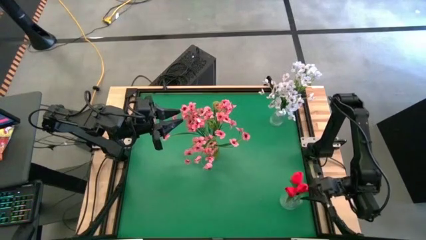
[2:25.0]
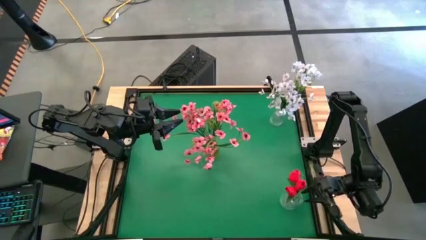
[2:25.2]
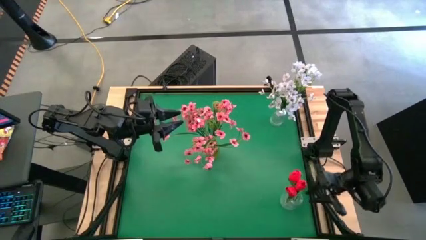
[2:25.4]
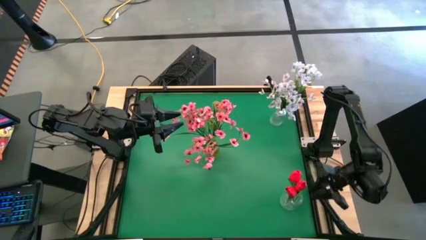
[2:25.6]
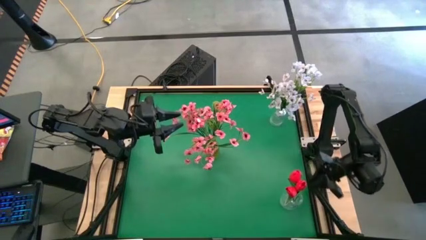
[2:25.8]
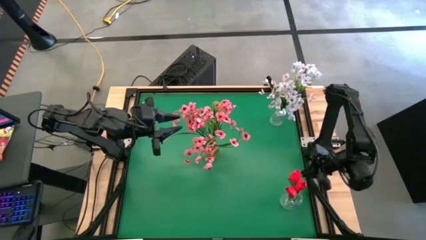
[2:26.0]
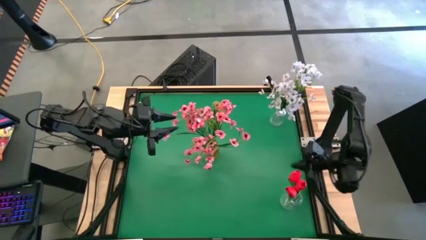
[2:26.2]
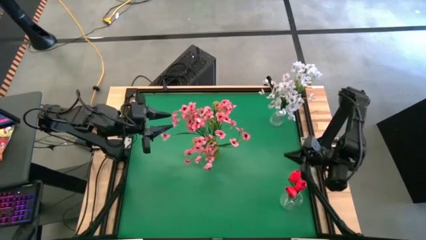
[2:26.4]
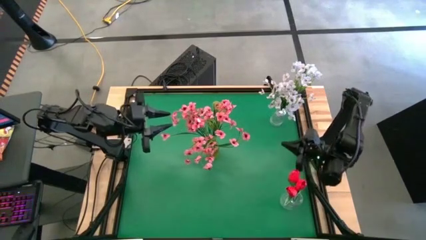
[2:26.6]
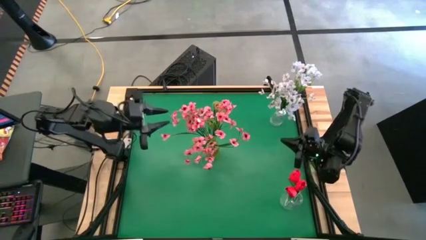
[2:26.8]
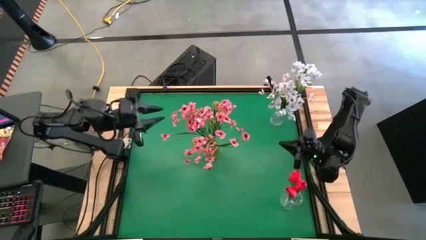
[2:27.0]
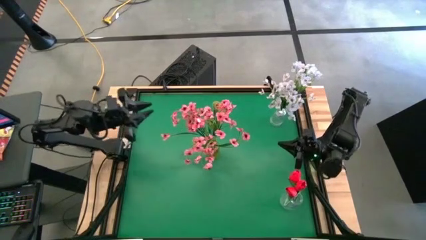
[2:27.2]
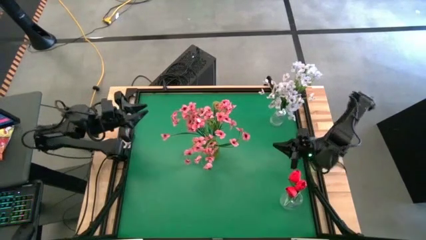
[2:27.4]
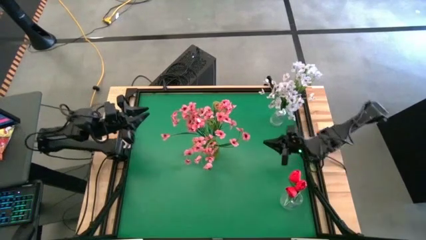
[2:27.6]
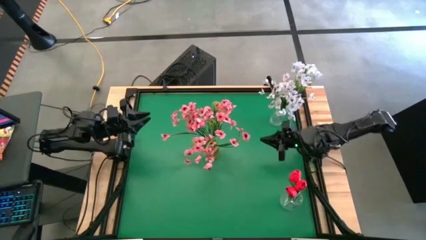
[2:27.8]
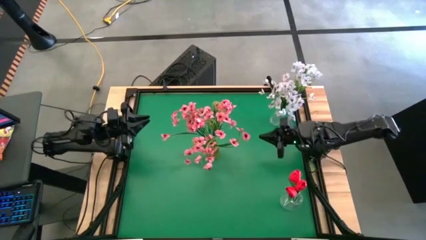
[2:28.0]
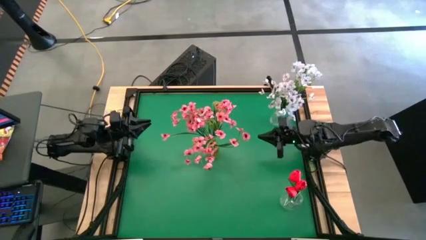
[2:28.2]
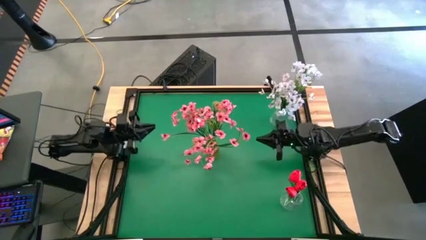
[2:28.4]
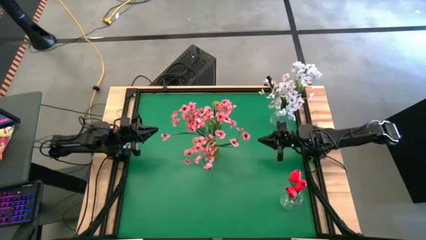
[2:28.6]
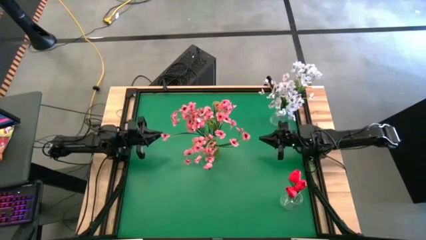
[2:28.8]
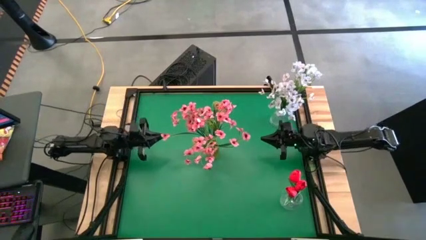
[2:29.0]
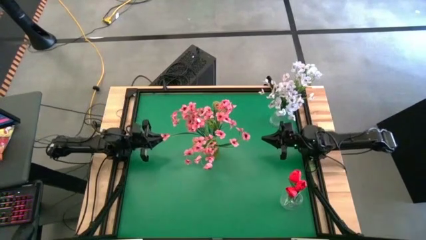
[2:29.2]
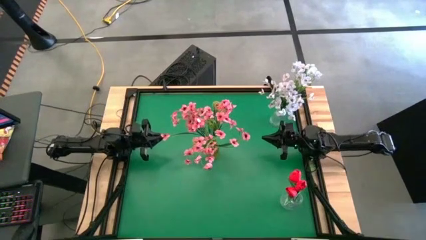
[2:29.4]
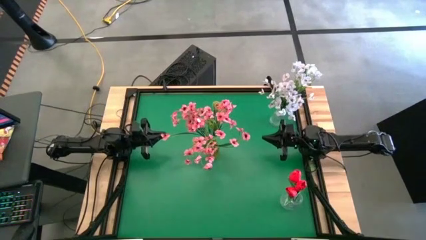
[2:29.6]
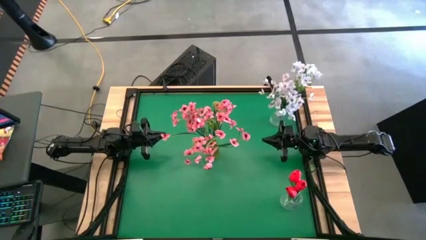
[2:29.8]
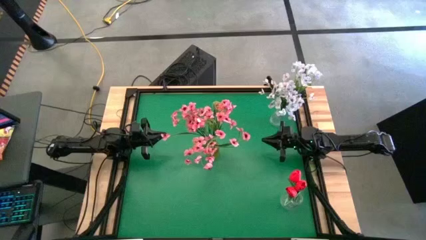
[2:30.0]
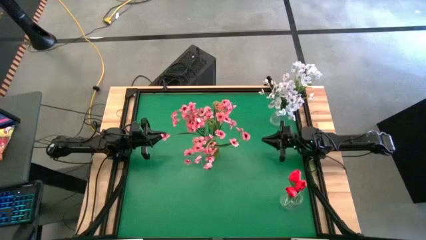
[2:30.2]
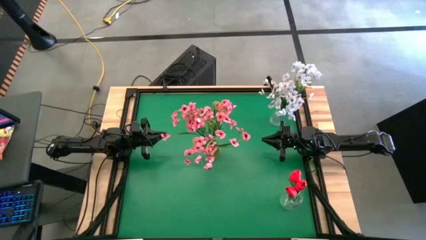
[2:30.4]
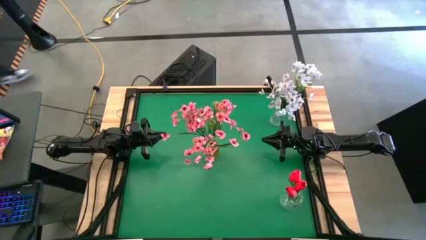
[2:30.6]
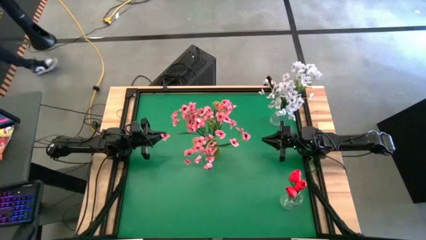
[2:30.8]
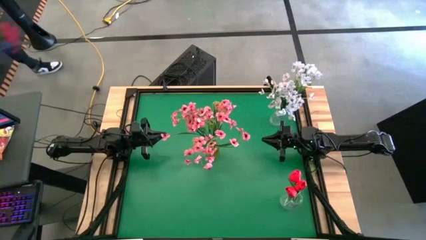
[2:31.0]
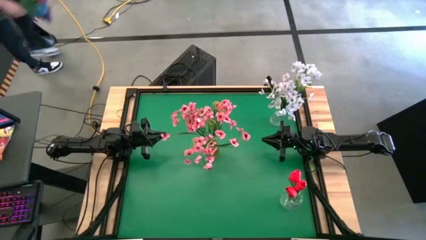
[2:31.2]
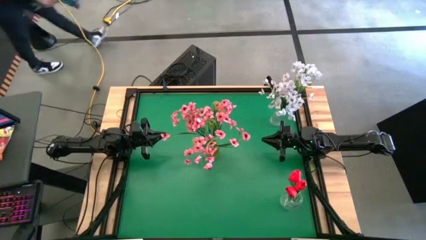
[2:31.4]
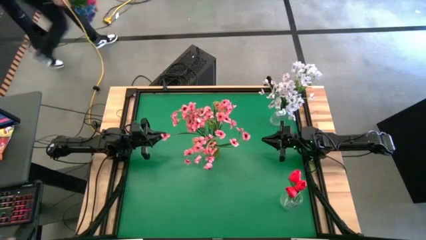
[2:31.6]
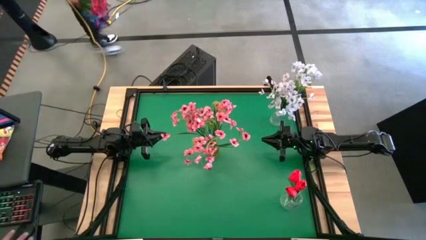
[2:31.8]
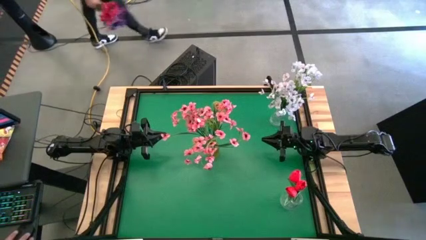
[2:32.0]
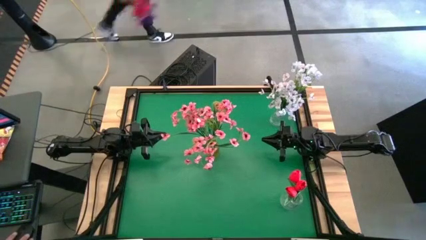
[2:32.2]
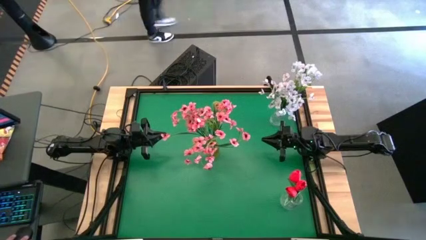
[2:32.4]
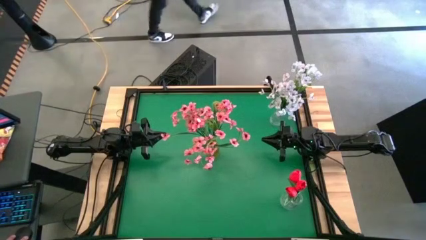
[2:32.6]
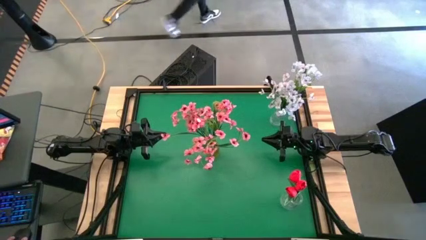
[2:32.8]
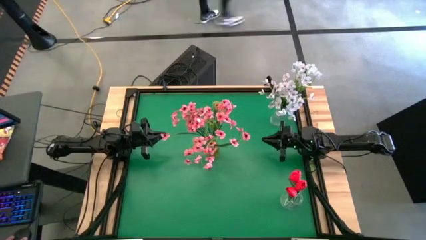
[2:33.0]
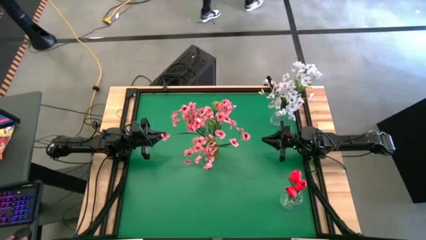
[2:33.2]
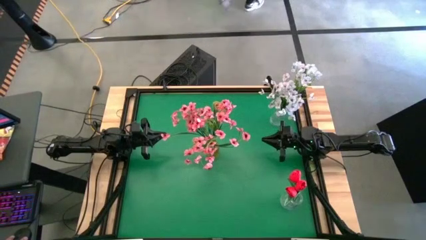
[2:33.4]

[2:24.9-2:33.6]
Task: Sort flowers into vase by color
Return to Home Position

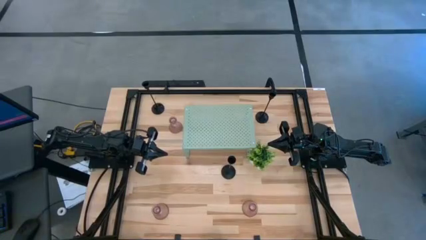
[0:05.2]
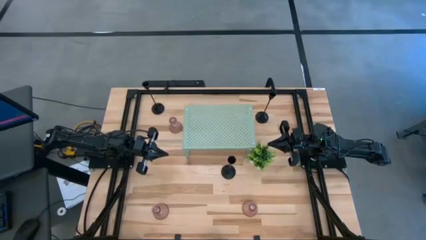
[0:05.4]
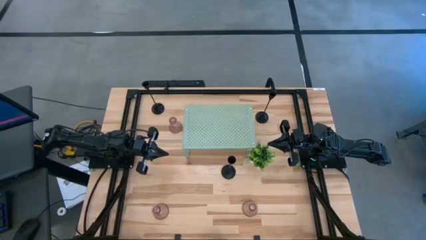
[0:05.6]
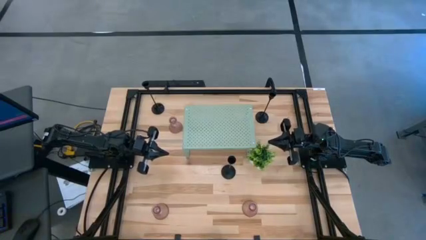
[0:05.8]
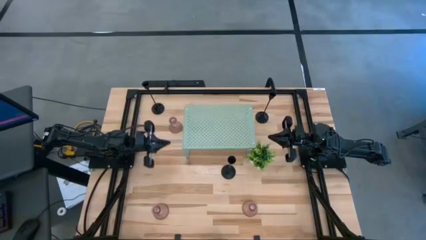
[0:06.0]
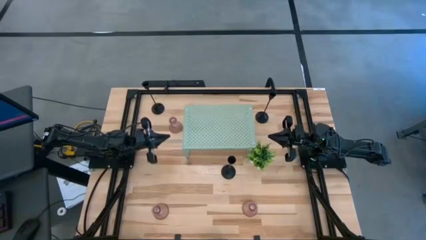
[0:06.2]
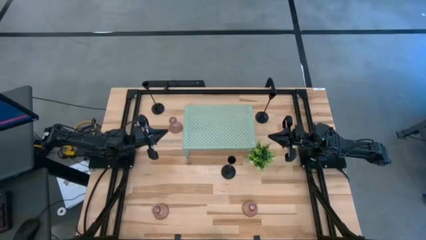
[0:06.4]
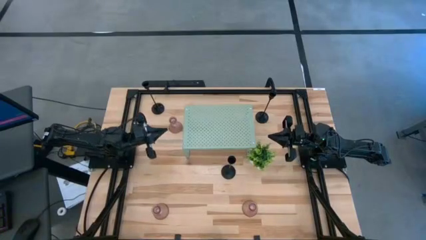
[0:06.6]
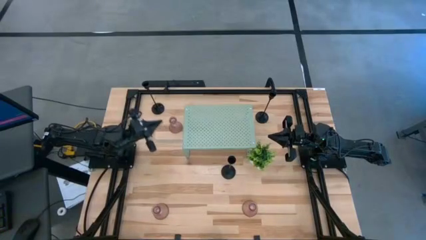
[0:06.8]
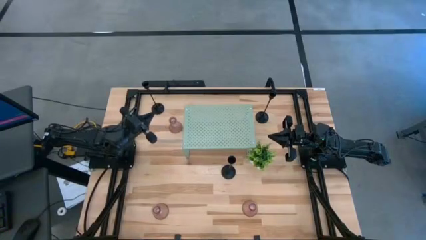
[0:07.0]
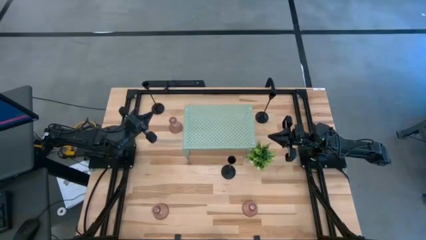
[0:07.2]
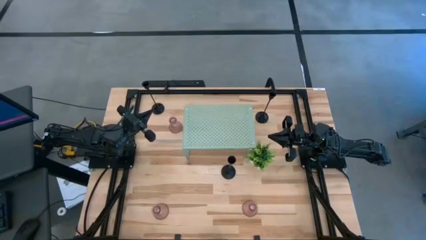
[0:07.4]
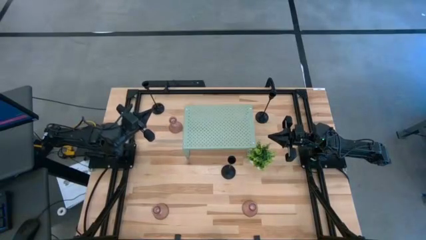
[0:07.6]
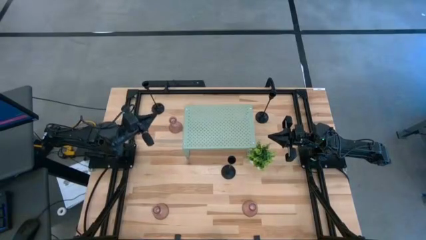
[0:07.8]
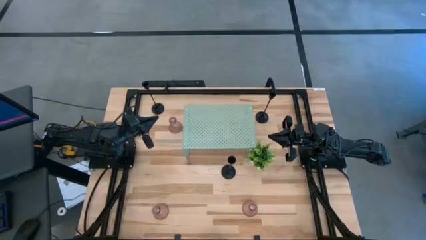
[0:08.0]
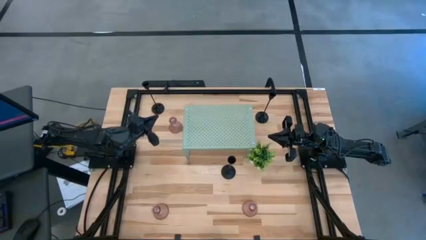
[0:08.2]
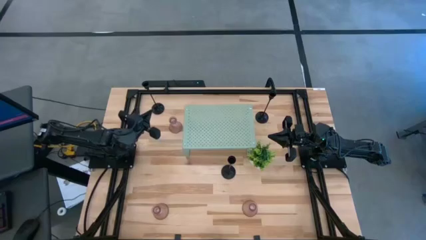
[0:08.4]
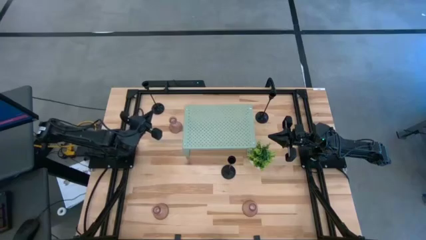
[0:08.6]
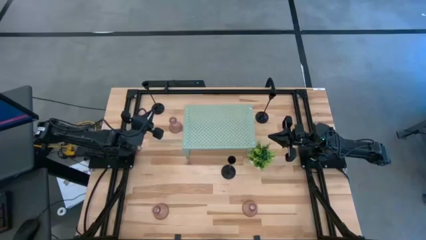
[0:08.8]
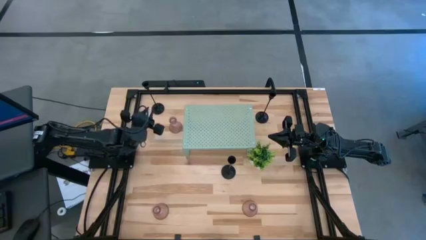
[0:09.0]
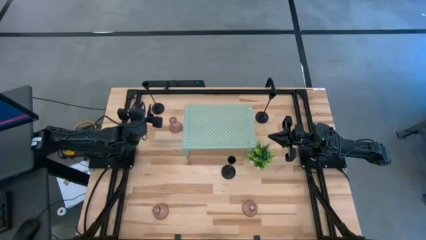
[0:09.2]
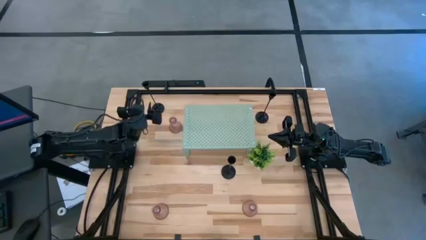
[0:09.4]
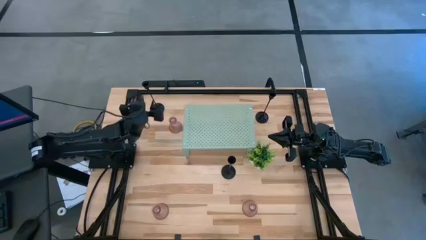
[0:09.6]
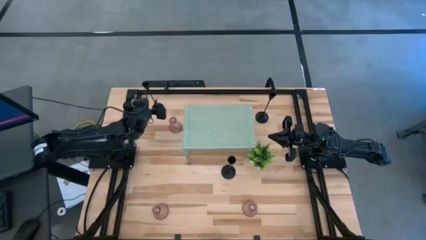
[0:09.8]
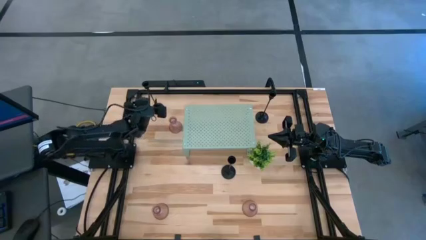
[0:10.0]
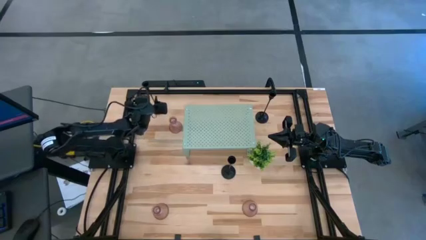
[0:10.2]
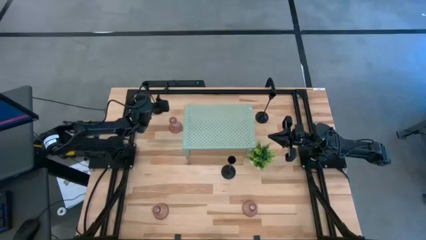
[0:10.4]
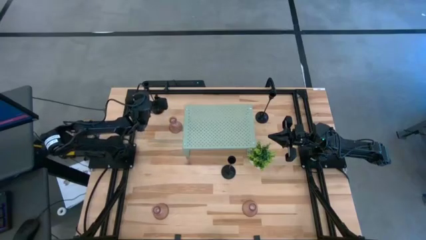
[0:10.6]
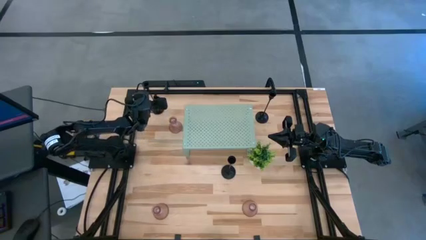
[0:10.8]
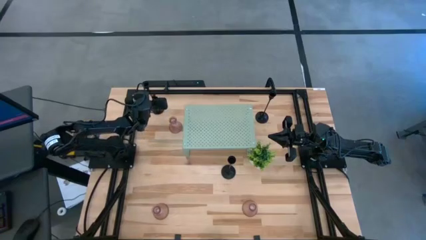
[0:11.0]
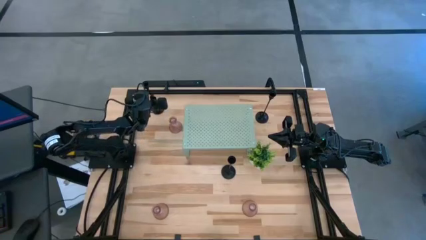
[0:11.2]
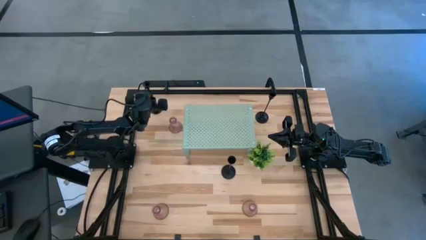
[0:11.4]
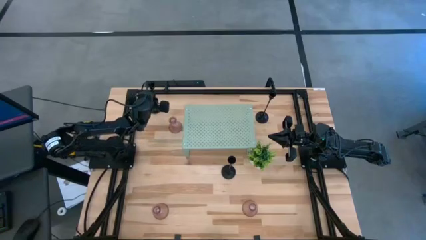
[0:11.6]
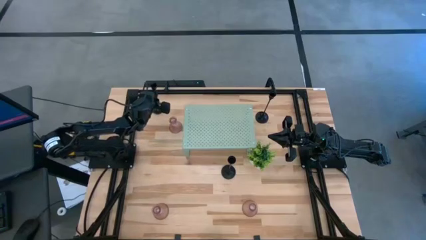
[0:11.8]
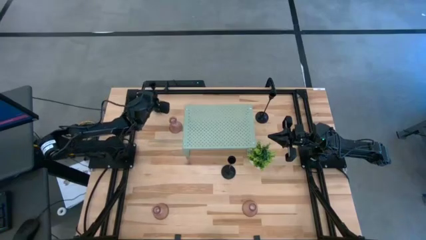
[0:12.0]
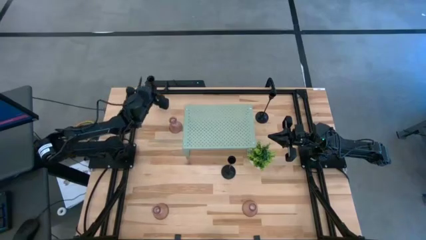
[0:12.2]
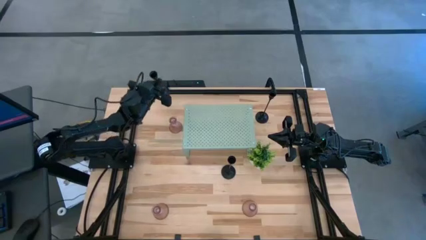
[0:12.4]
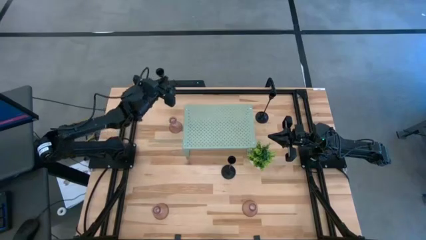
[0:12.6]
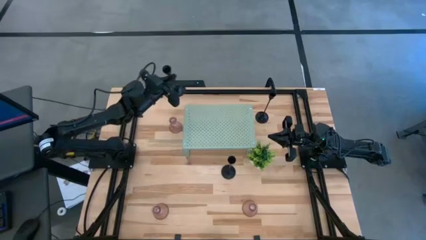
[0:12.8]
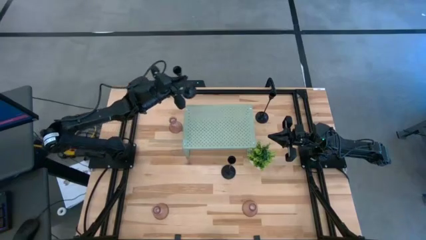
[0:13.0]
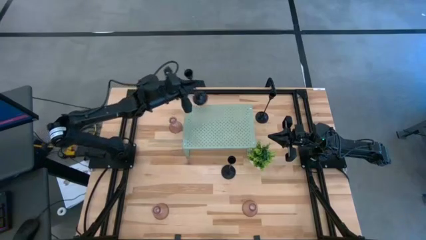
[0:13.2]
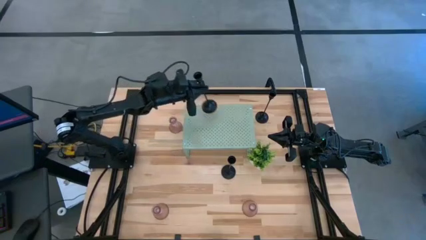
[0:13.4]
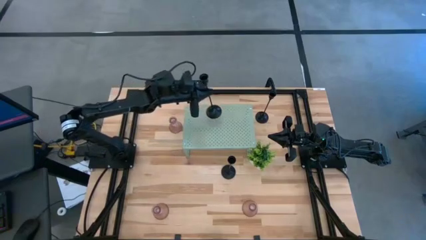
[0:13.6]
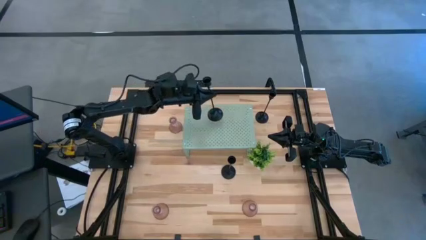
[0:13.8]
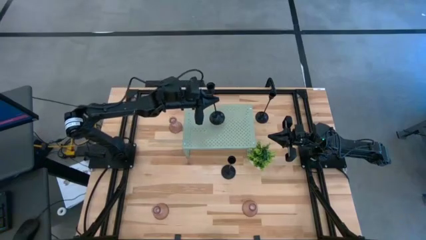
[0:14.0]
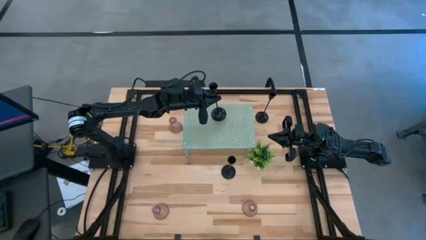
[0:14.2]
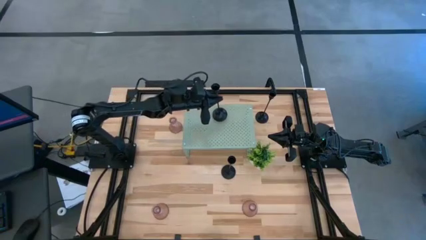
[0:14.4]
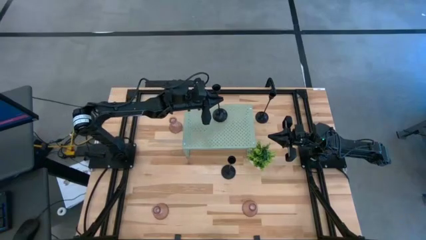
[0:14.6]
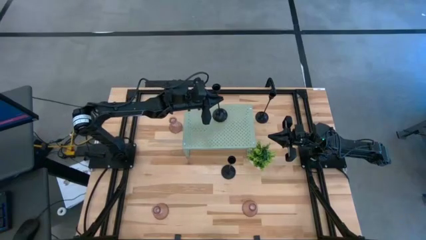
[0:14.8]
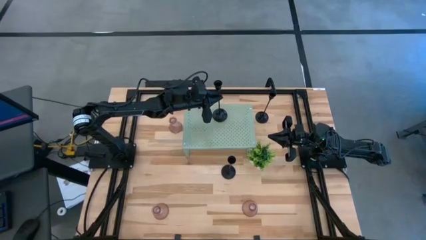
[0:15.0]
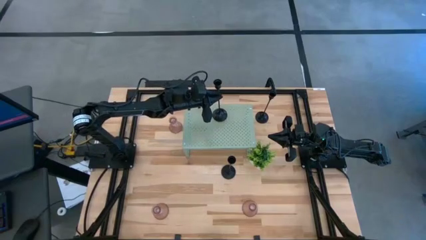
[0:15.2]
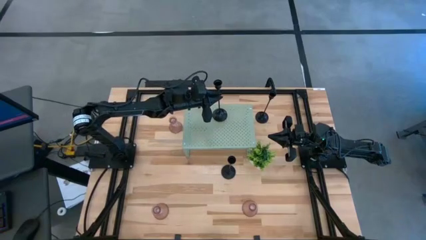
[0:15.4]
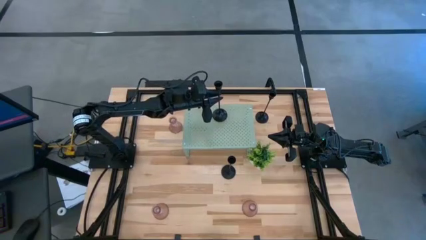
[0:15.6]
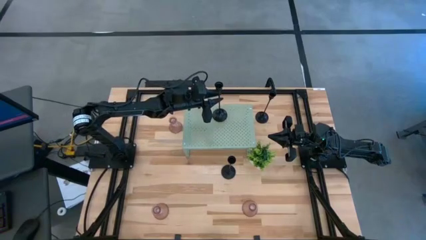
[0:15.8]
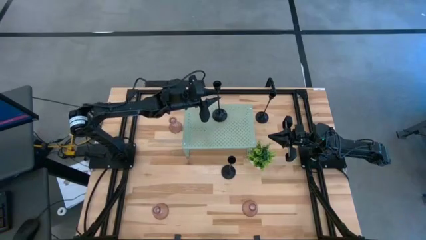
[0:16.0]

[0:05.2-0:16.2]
Task: Pick & Place candle stick holders
Put the top left black candle holder on the shelf
